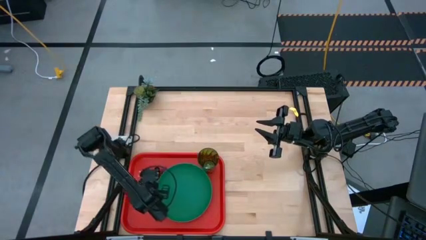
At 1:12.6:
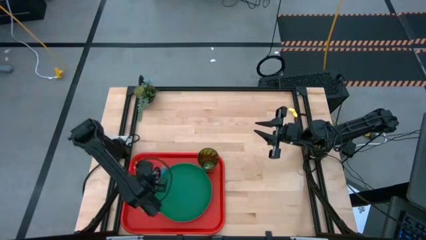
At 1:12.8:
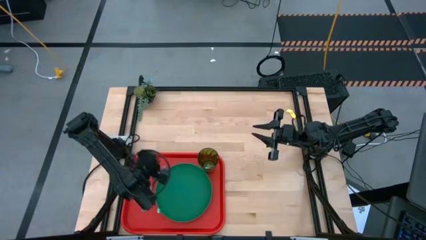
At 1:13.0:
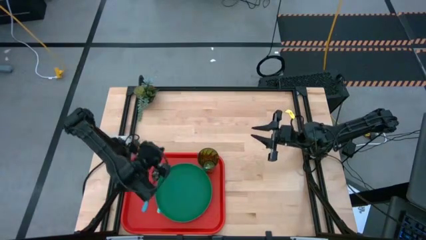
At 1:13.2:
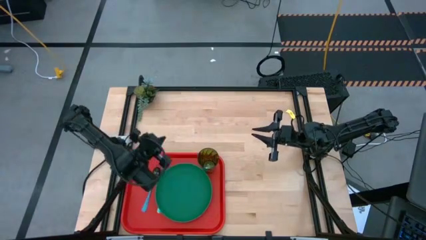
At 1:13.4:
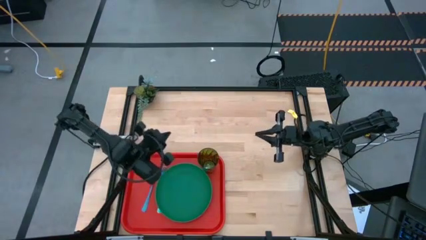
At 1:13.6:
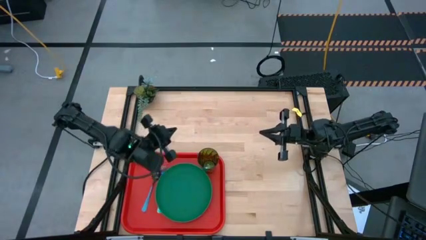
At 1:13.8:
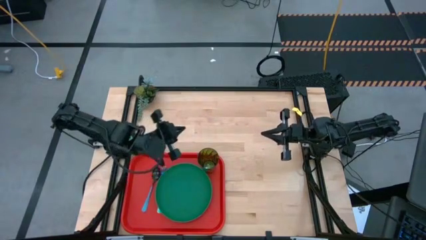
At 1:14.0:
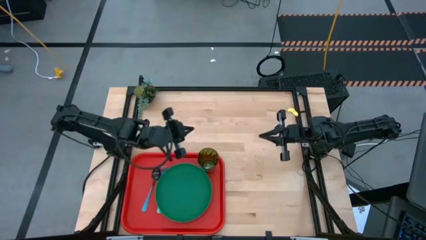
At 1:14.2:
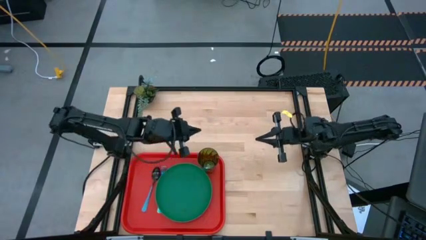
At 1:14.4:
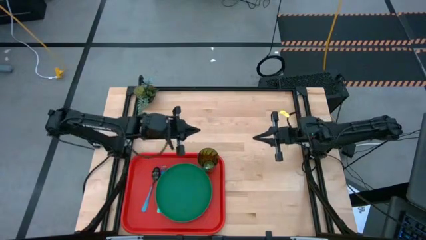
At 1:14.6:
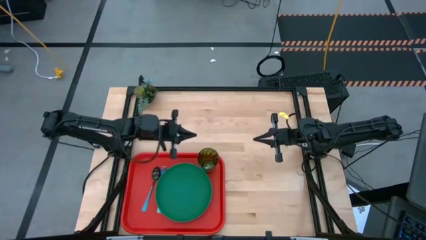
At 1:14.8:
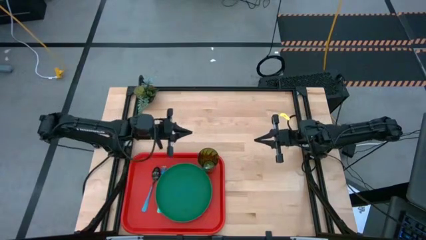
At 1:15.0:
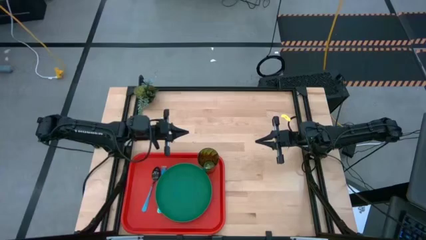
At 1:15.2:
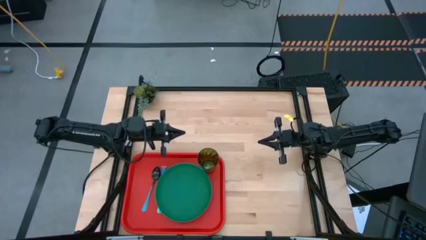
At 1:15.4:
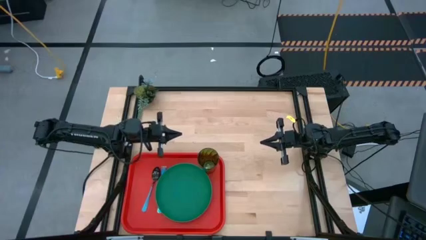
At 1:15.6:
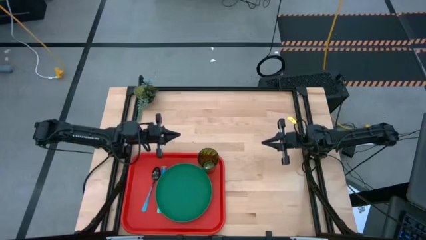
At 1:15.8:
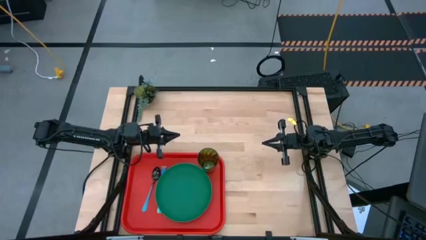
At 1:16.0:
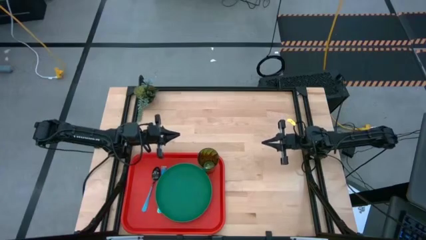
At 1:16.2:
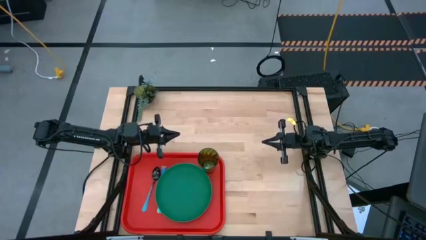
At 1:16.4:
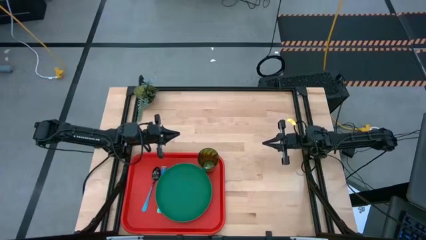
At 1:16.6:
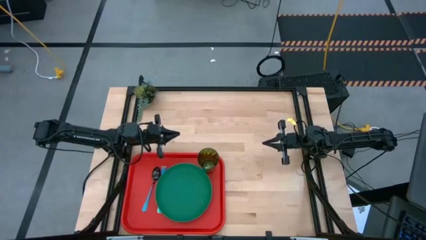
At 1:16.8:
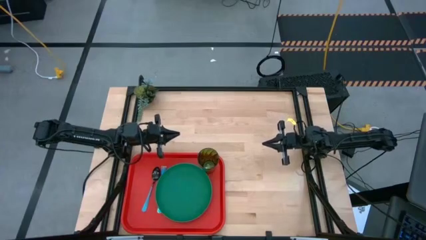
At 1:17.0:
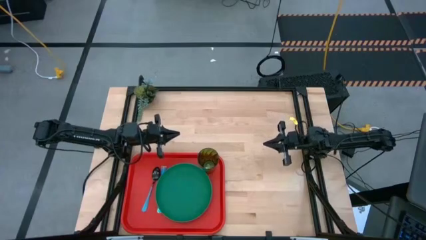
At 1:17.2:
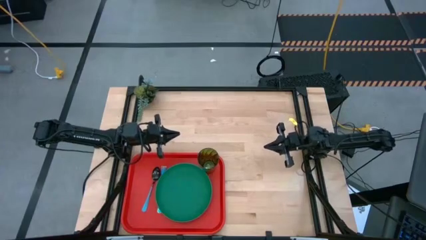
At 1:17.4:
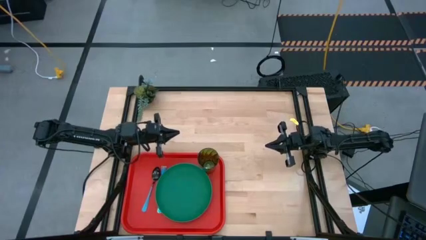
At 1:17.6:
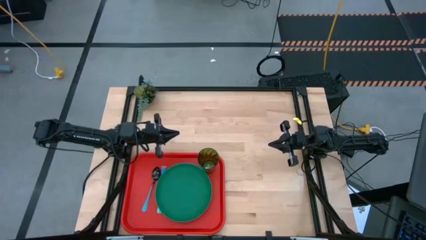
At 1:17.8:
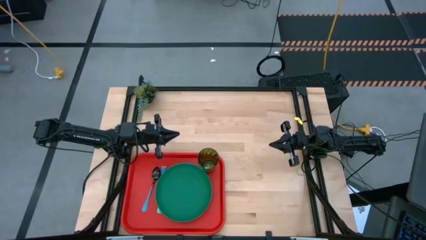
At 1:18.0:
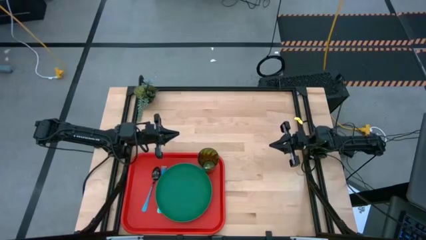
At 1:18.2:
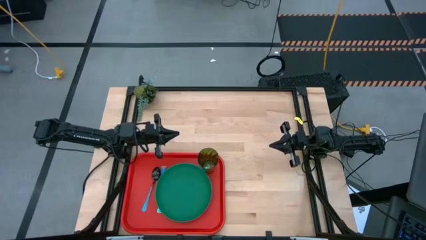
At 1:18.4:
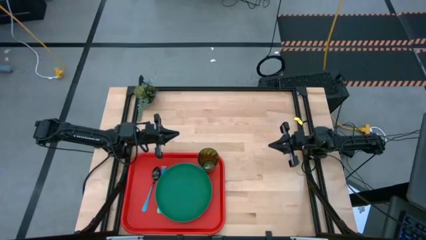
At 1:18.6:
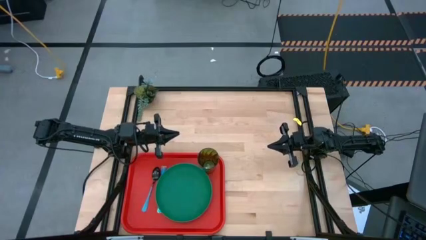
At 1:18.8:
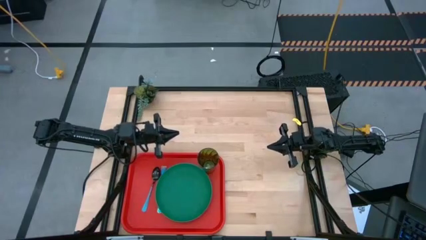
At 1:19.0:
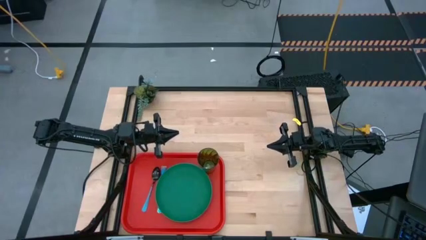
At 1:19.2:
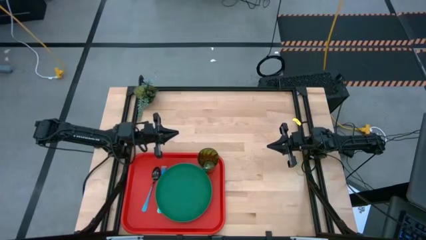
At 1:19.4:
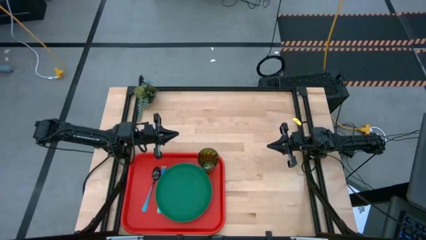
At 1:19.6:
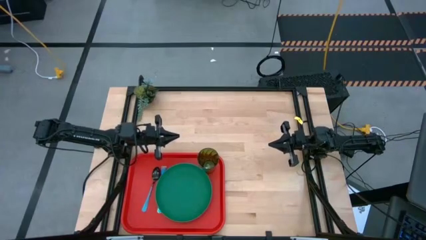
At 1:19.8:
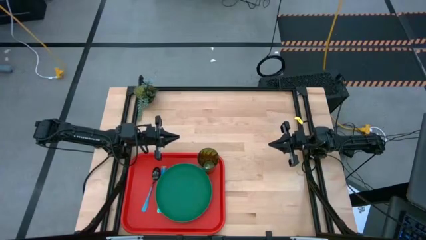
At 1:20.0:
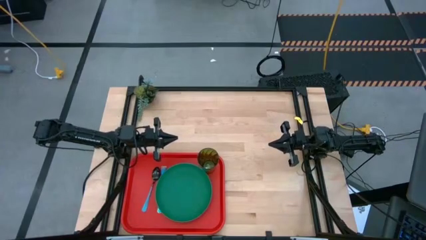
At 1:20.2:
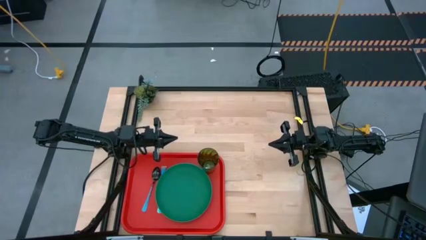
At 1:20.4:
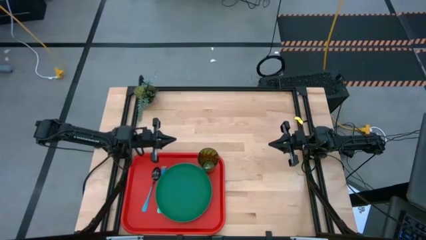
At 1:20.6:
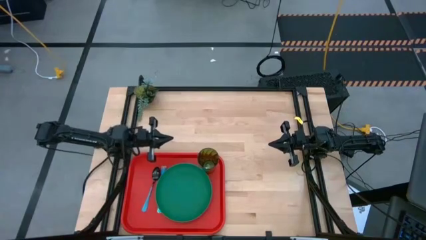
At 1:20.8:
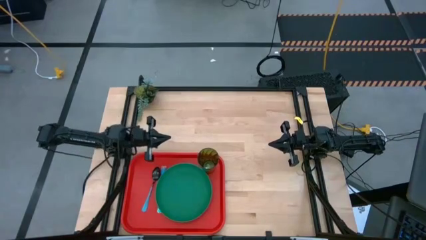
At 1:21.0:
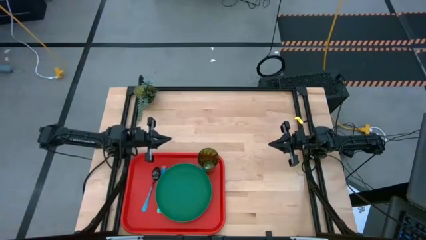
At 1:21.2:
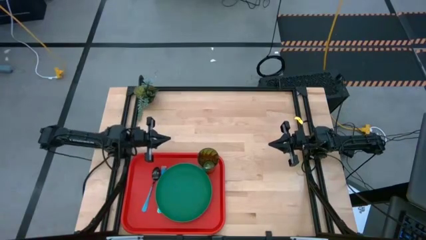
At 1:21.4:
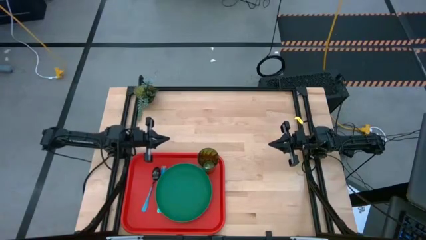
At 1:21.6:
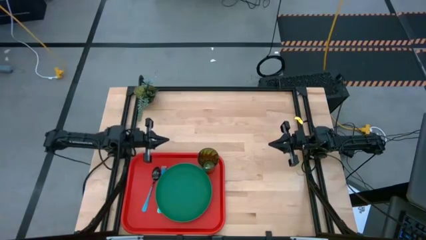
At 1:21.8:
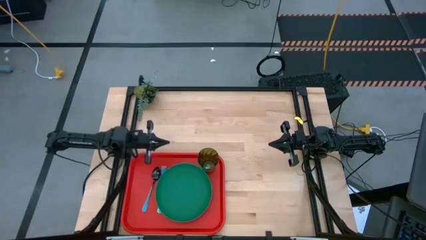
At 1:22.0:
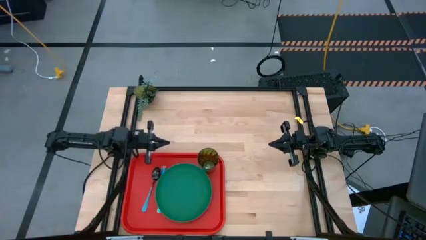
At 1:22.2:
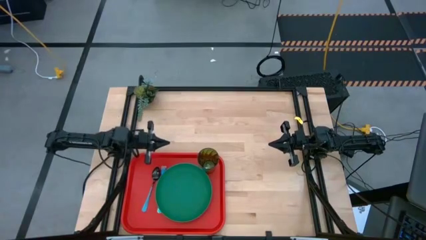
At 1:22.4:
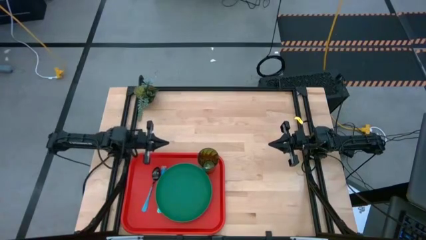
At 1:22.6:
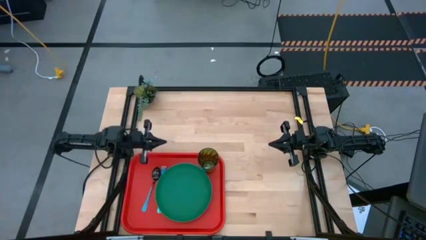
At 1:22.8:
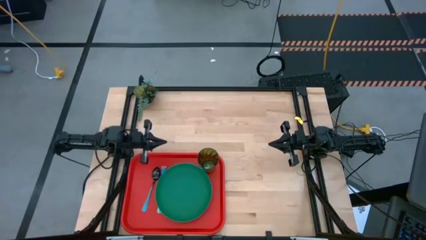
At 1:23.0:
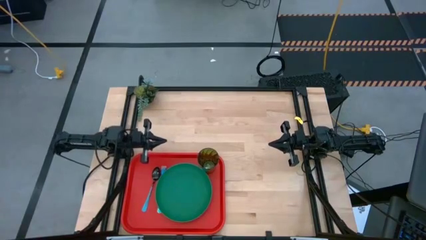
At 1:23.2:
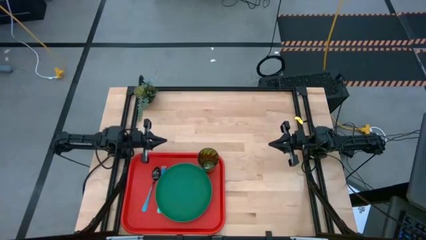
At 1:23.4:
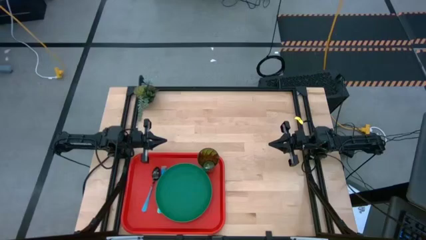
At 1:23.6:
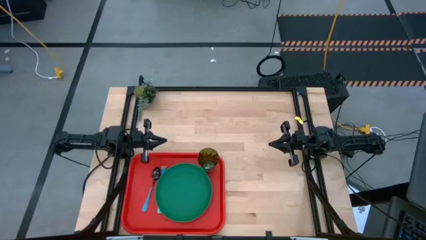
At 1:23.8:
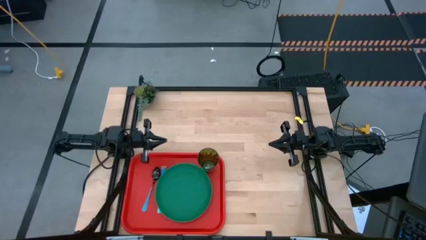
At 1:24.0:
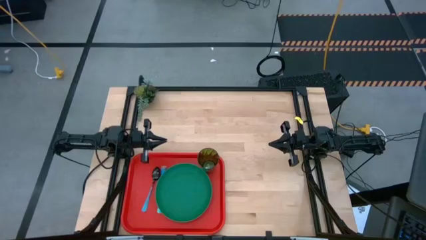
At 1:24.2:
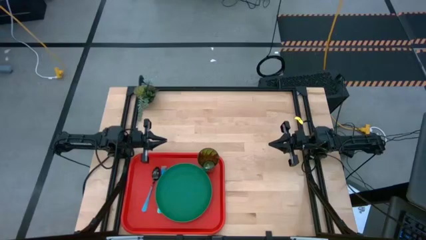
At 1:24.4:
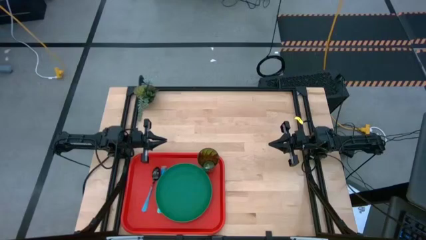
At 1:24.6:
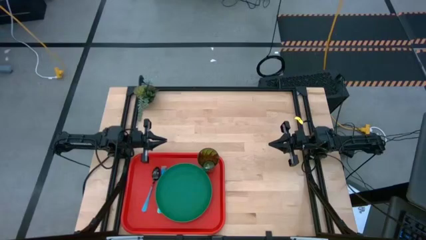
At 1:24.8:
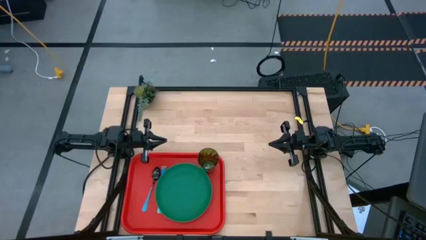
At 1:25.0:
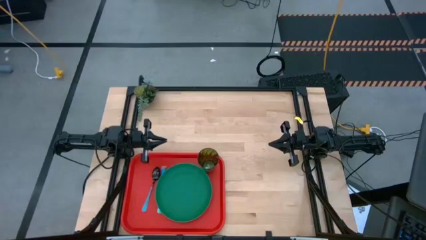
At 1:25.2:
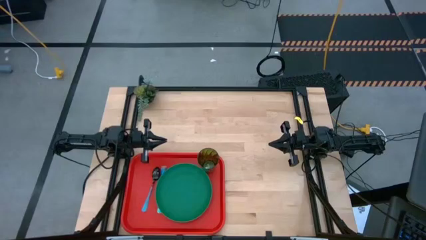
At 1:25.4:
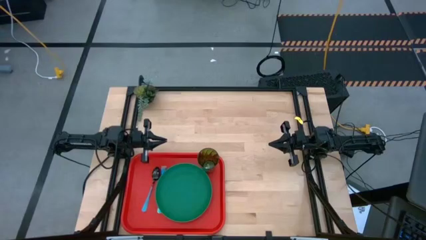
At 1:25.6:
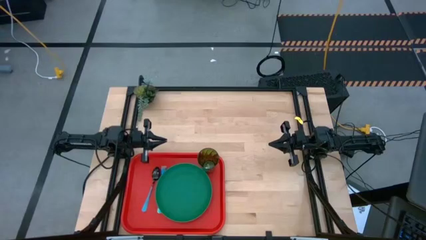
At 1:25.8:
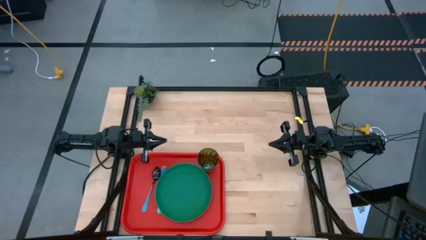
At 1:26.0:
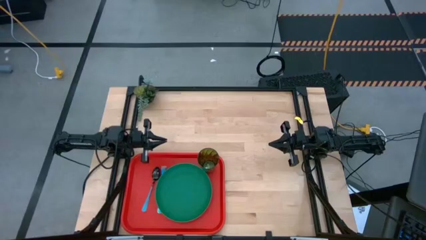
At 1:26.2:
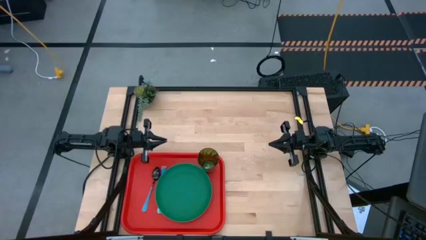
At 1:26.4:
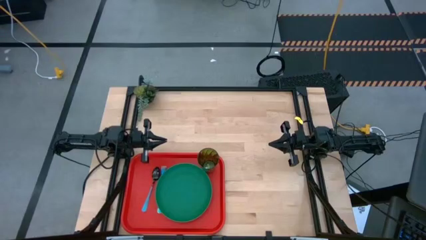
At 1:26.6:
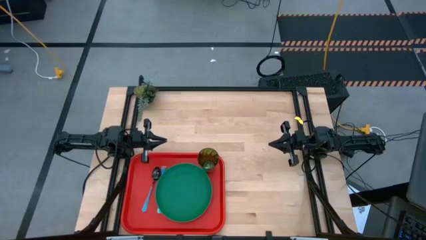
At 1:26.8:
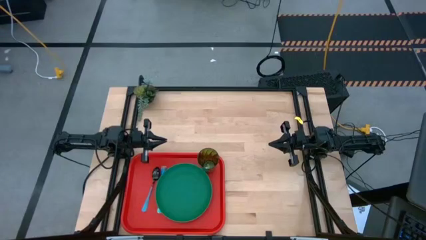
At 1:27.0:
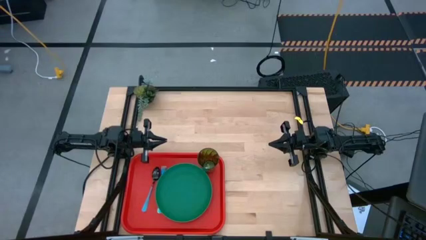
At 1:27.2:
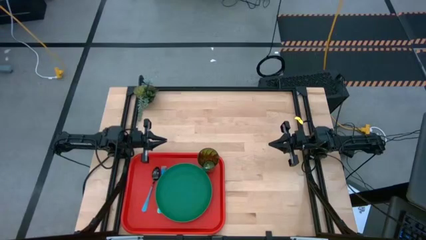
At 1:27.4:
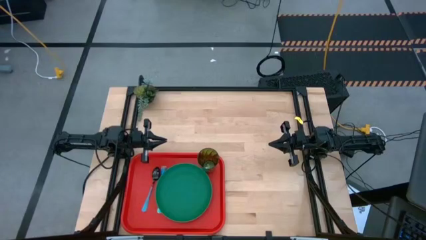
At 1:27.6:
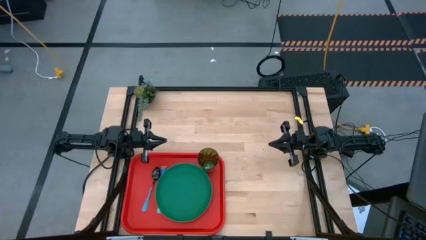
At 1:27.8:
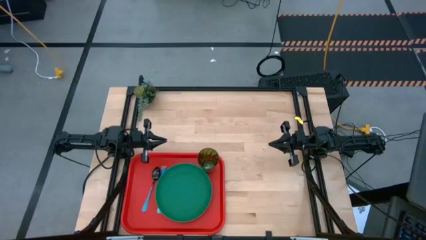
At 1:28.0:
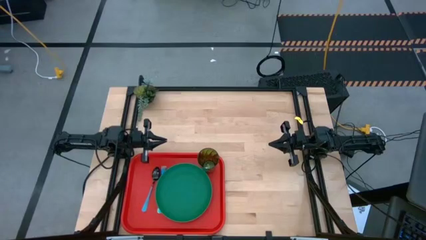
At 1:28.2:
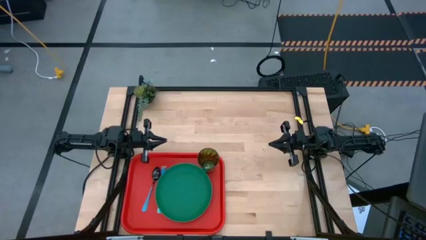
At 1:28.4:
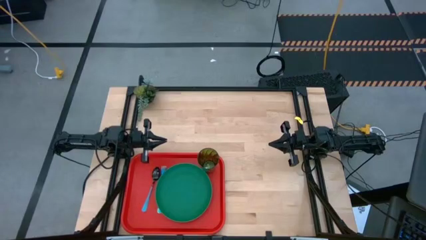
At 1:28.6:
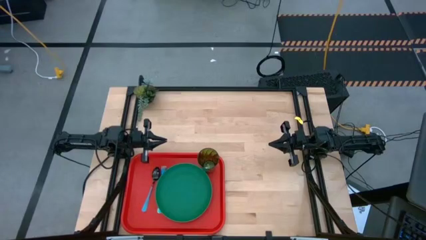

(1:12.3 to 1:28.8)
Task: Pick and place plate/cup/fork/spoon on tray
Return to Home Position
